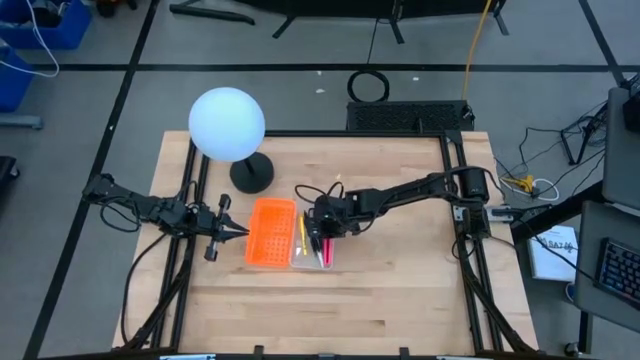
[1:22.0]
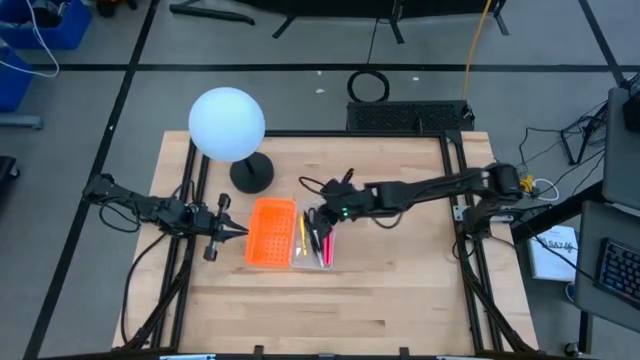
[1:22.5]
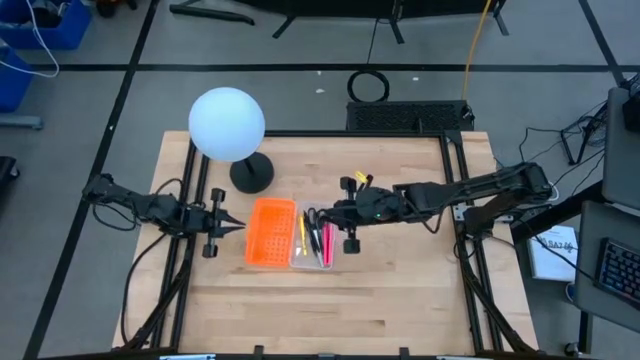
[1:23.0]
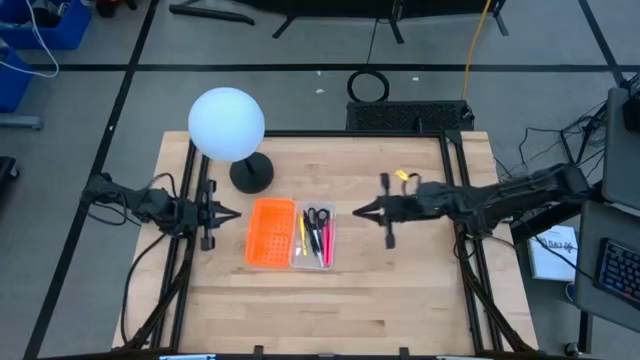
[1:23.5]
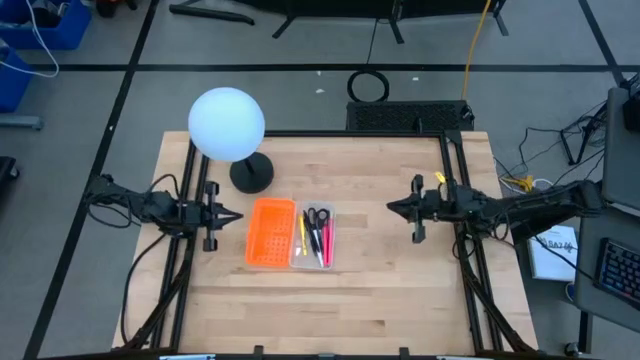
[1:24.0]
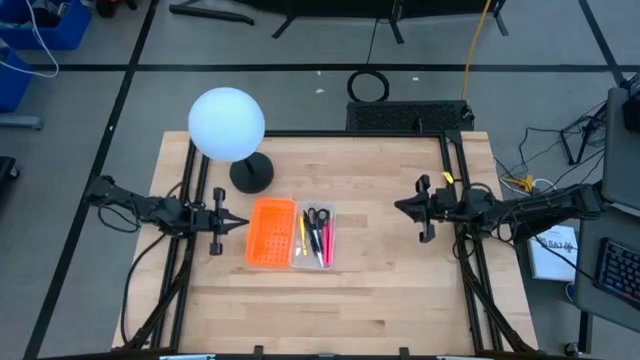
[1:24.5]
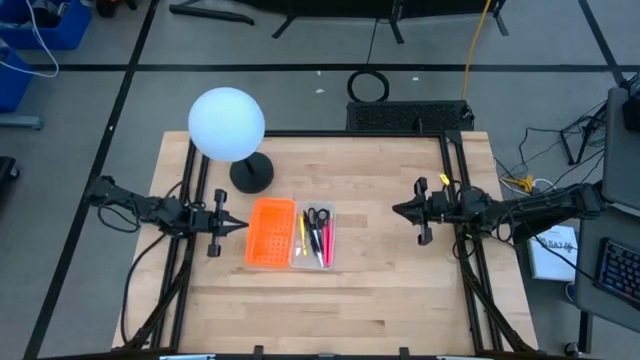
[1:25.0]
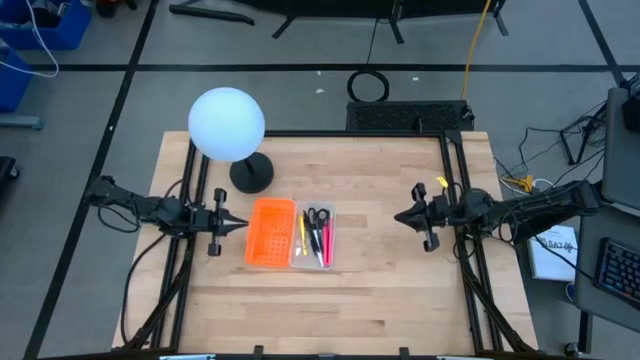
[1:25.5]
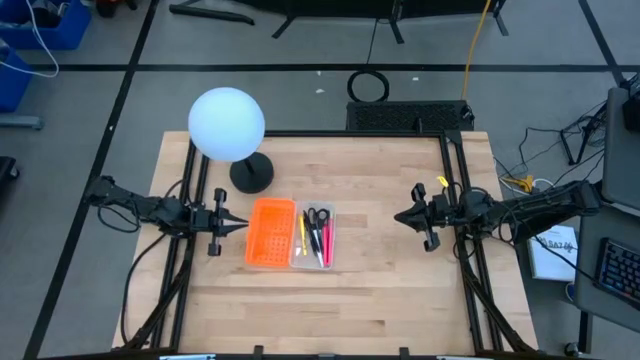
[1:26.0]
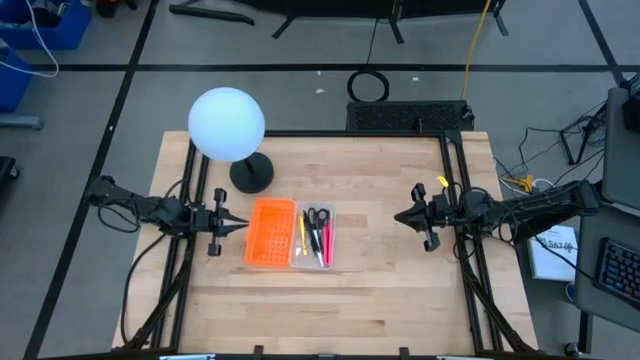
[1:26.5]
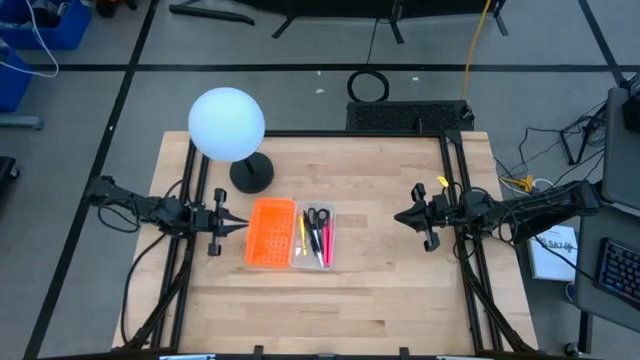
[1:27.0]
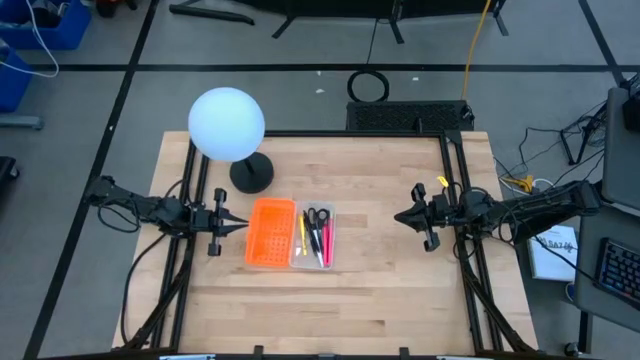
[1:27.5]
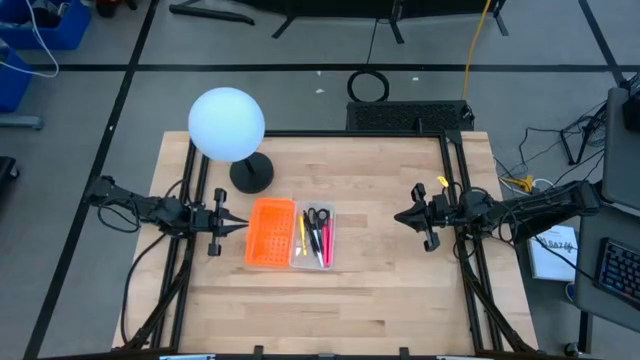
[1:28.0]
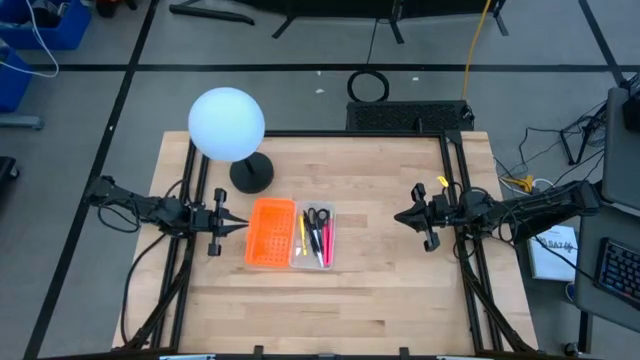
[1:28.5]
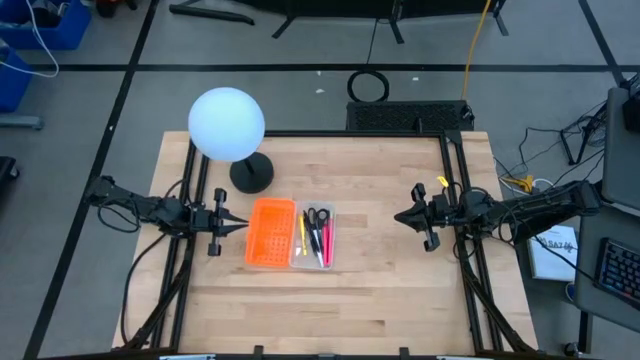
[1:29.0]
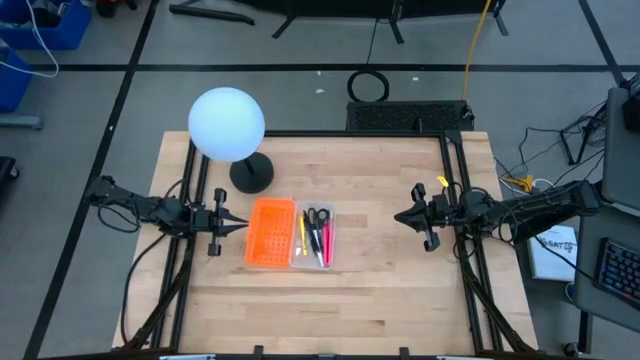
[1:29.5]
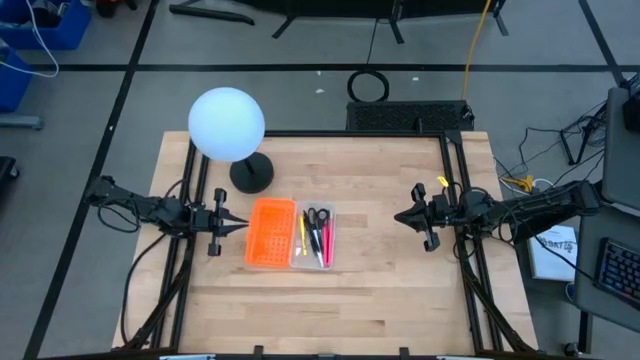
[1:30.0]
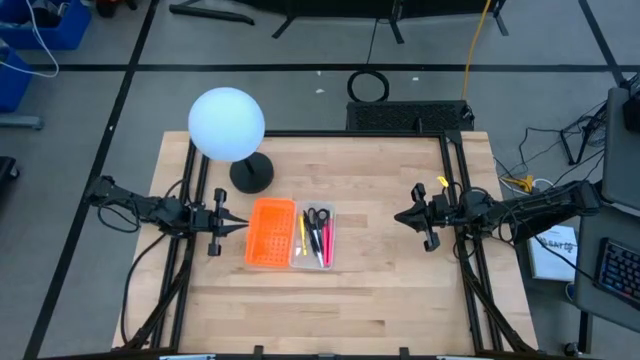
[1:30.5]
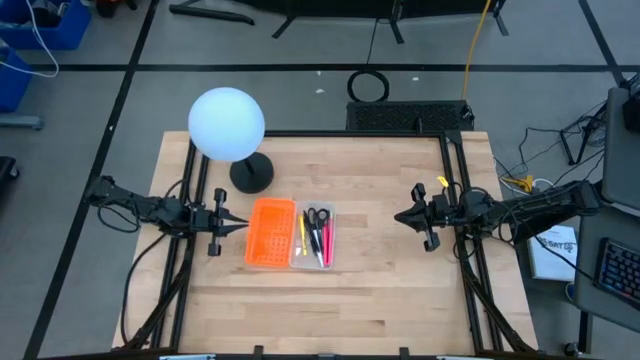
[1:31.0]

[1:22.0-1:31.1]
Task: Pick & place school supplies into a supply box
Return to Home Position

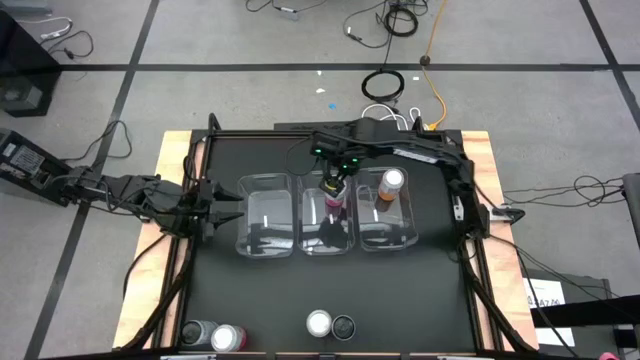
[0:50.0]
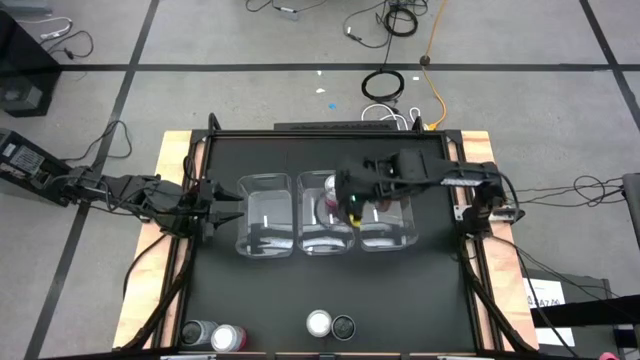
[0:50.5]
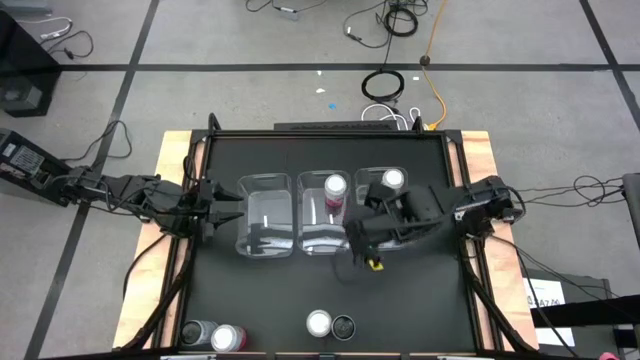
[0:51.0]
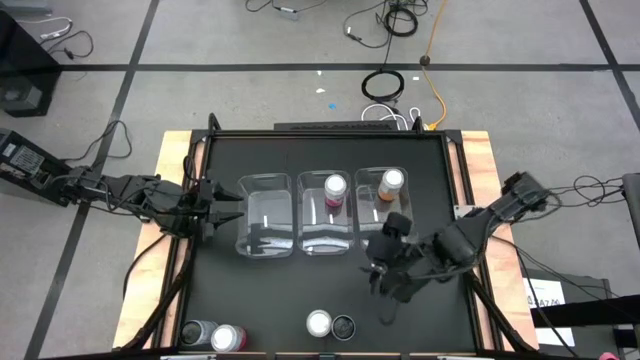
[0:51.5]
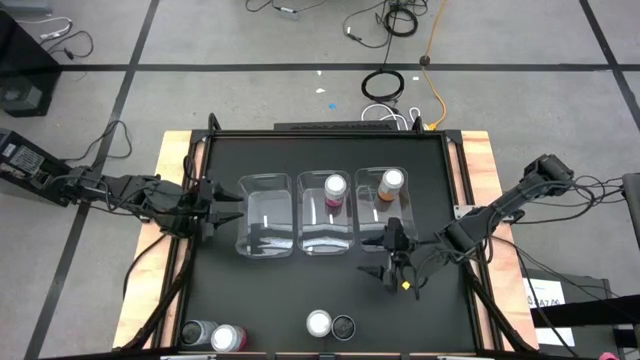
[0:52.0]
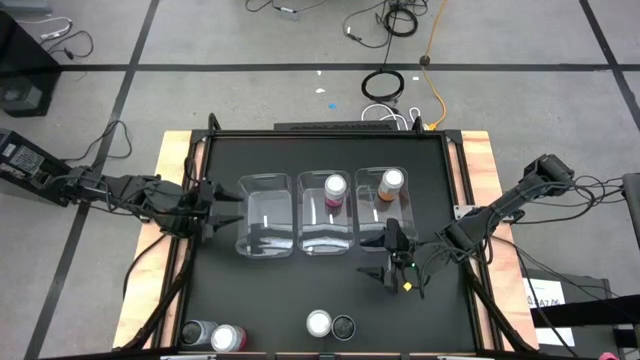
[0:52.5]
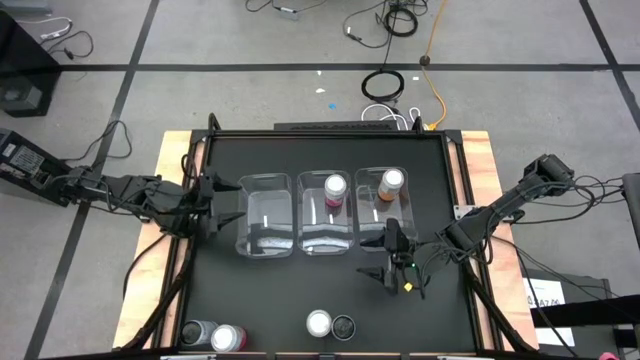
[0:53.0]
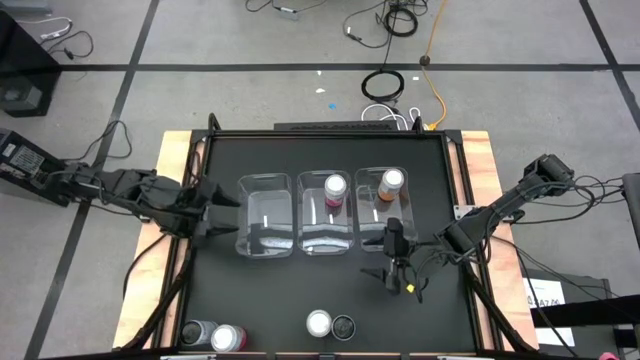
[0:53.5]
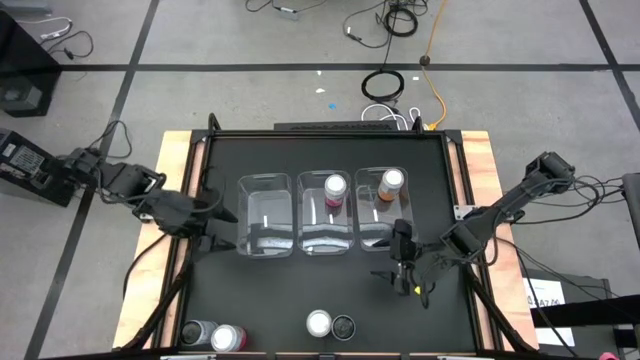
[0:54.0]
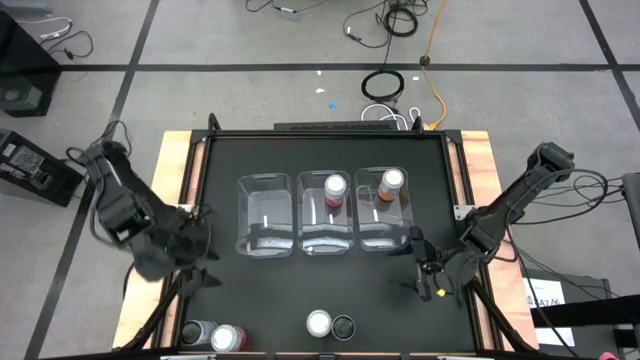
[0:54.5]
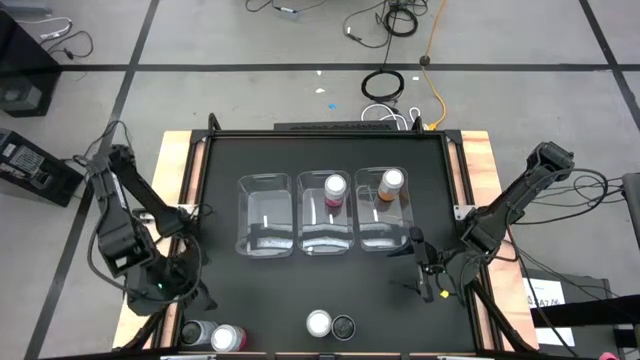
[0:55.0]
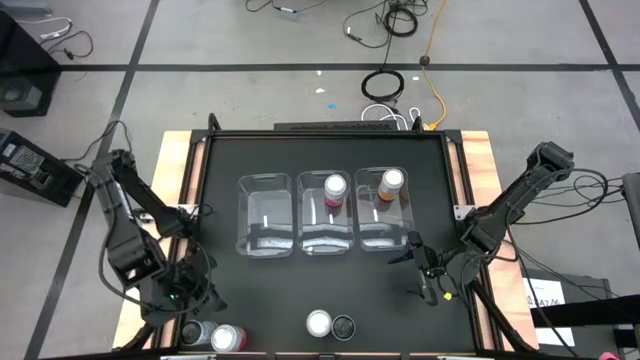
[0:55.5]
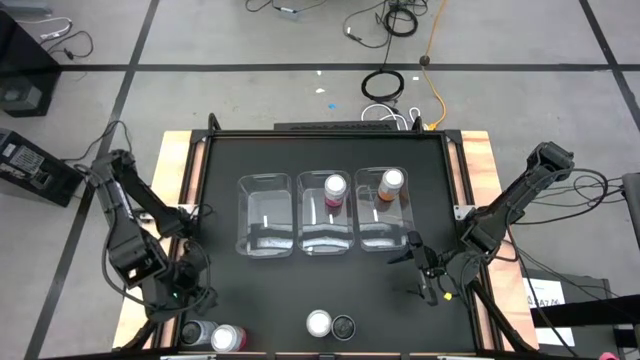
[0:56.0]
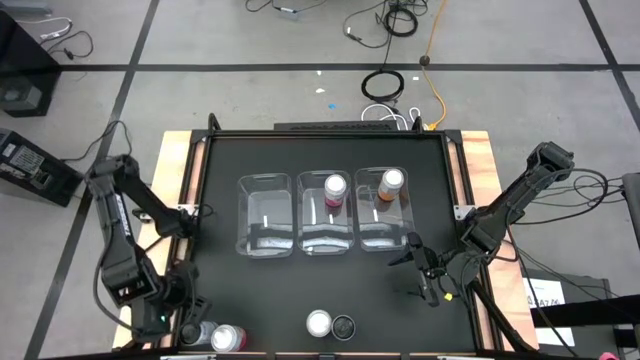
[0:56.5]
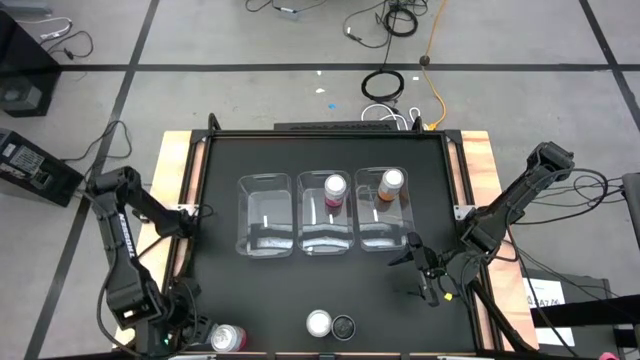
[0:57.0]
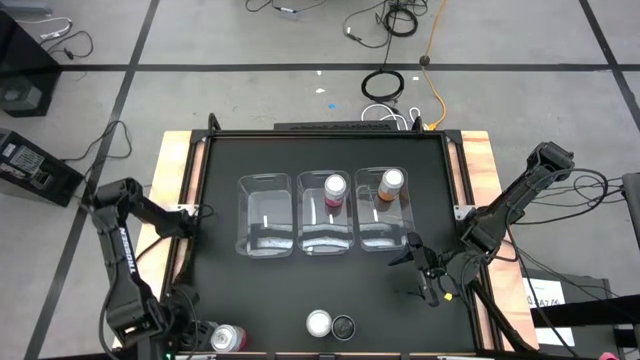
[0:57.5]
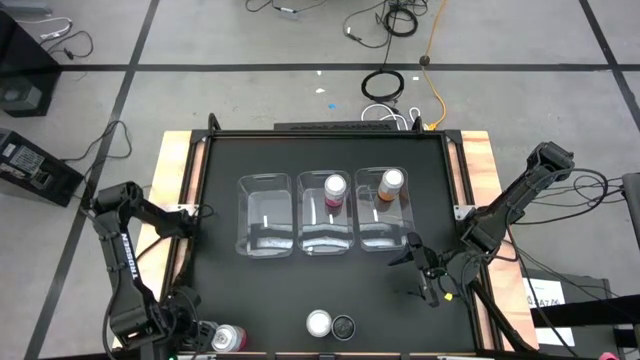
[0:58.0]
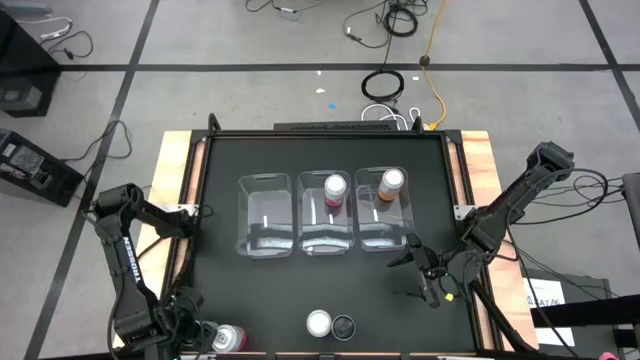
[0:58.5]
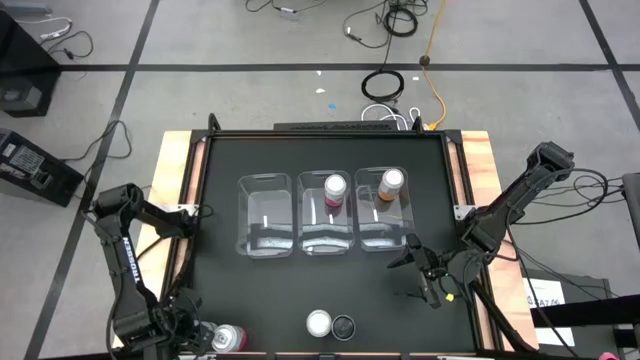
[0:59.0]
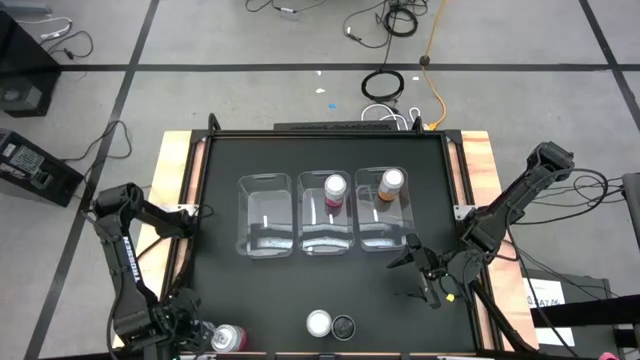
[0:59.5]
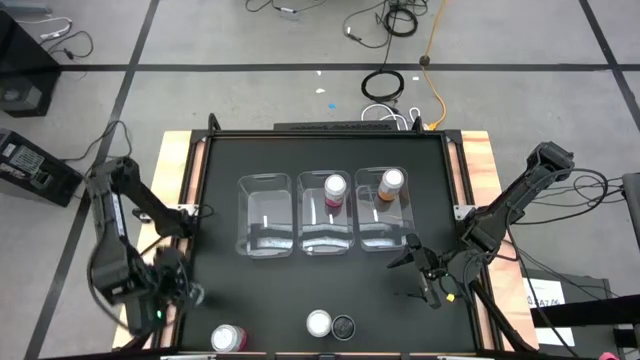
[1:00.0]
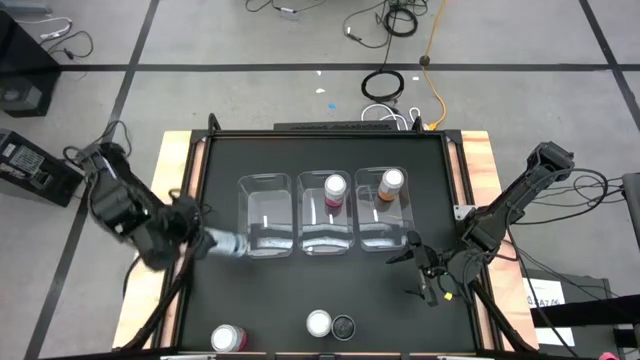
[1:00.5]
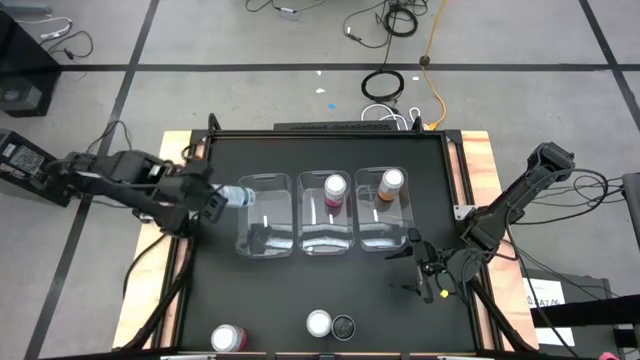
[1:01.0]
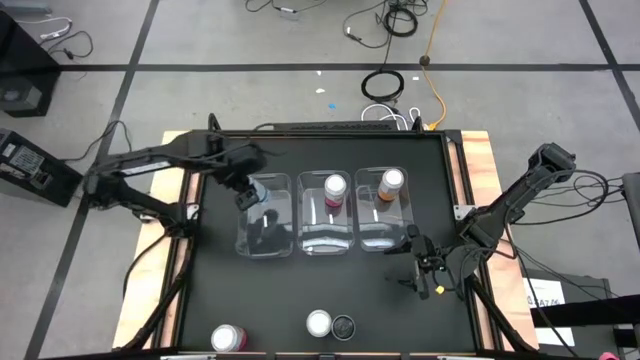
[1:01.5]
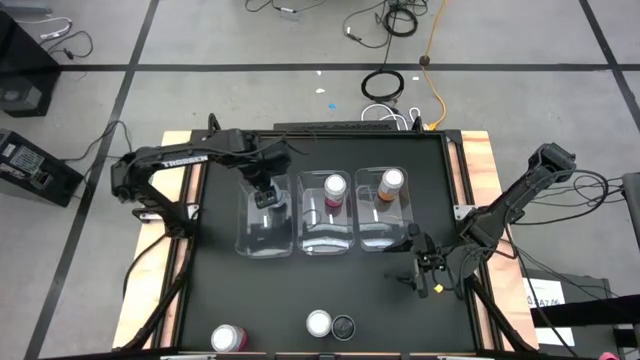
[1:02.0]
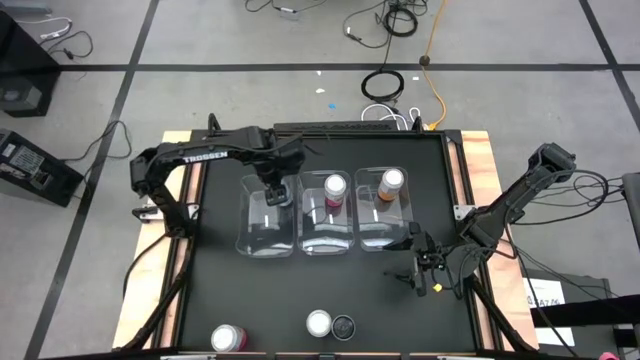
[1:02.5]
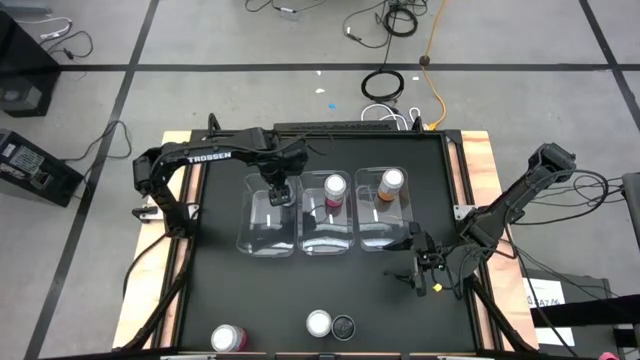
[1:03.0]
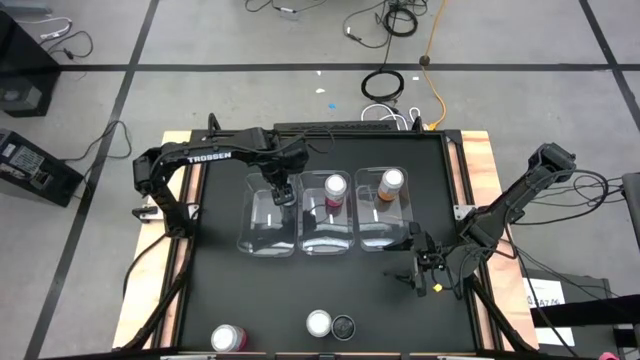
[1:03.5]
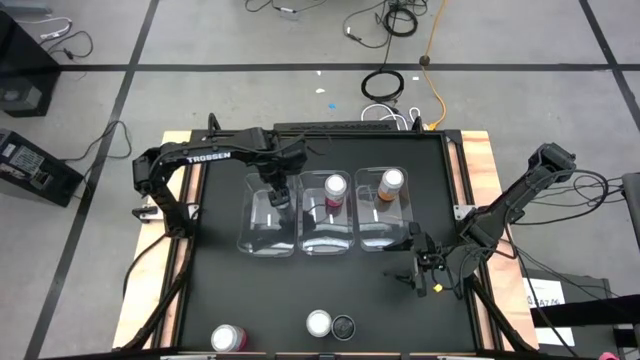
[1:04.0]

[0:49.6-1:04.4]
Task: Sort soda cans
Put the left blue soda can into the left transparent bin
